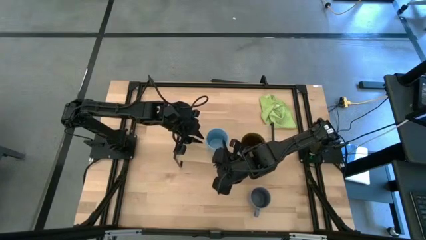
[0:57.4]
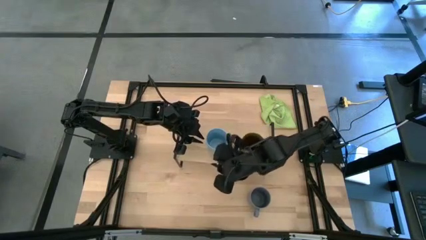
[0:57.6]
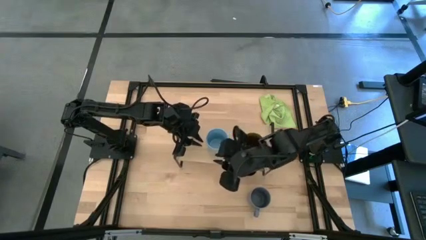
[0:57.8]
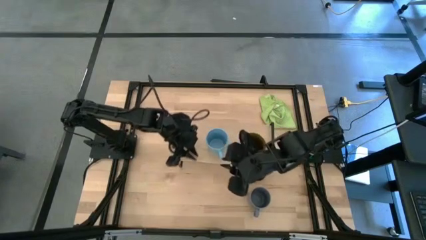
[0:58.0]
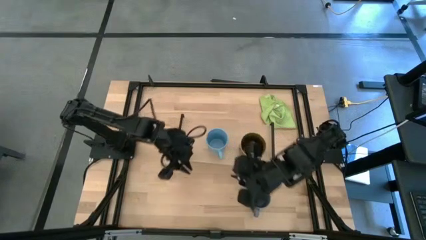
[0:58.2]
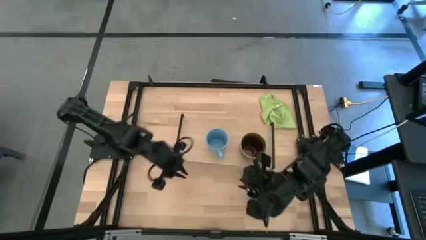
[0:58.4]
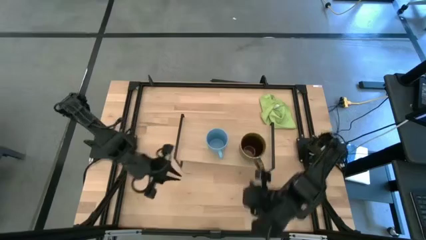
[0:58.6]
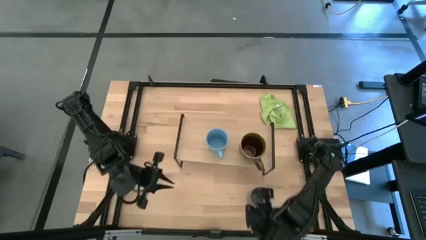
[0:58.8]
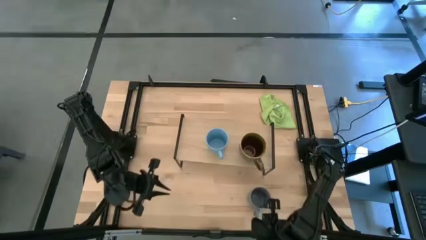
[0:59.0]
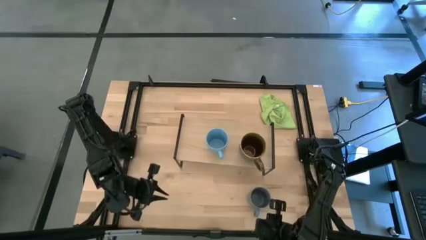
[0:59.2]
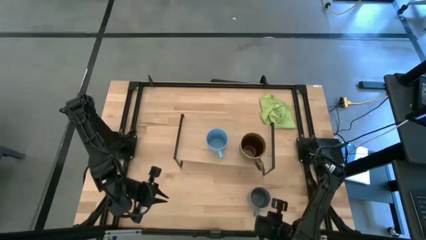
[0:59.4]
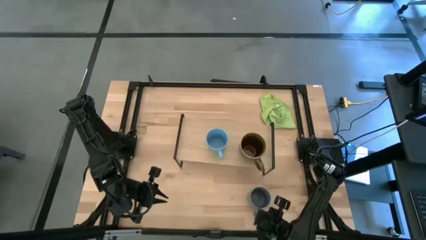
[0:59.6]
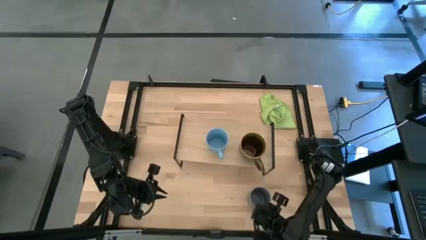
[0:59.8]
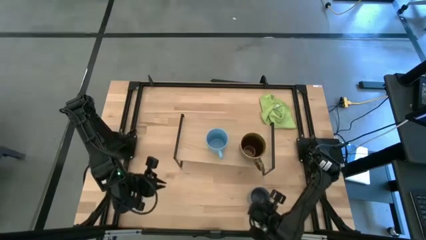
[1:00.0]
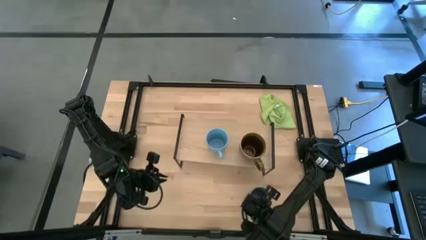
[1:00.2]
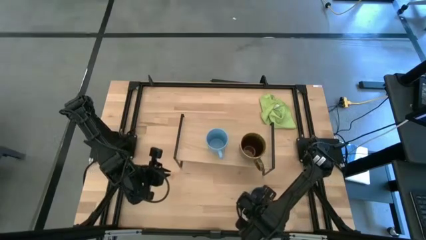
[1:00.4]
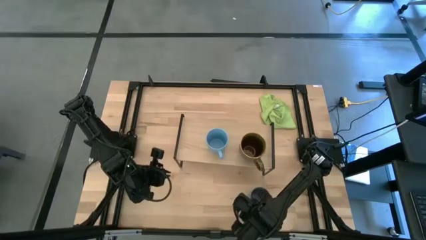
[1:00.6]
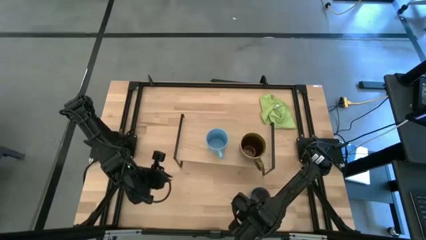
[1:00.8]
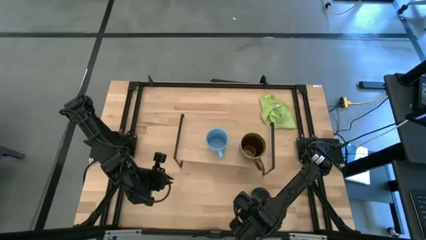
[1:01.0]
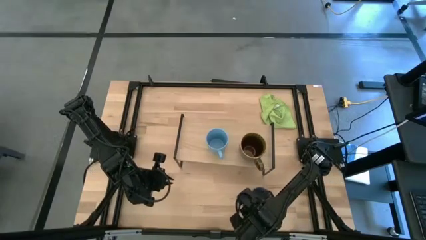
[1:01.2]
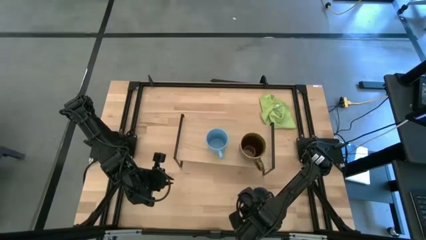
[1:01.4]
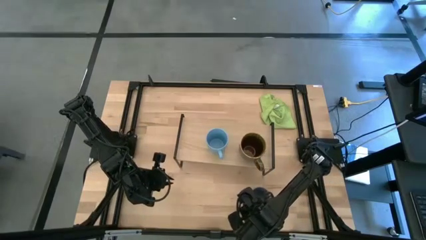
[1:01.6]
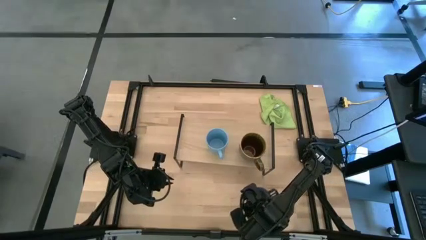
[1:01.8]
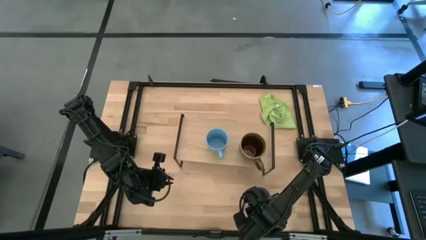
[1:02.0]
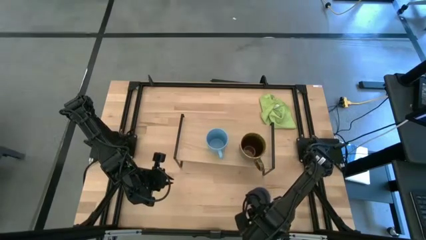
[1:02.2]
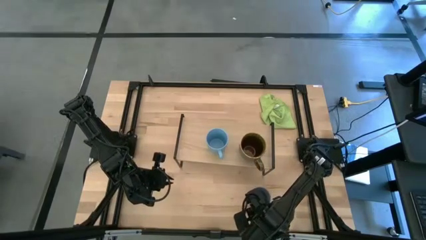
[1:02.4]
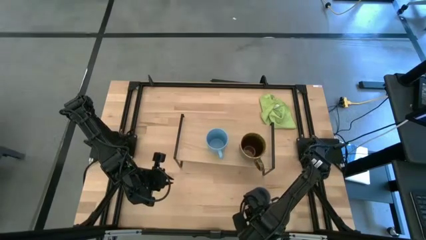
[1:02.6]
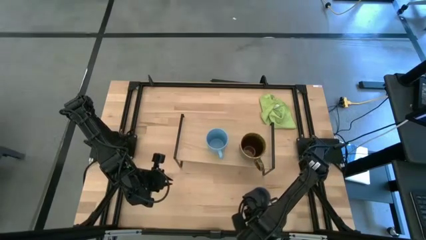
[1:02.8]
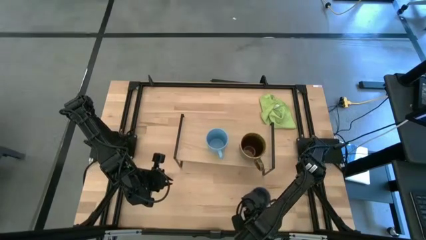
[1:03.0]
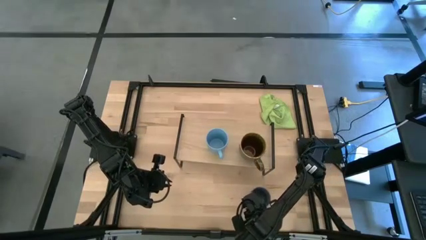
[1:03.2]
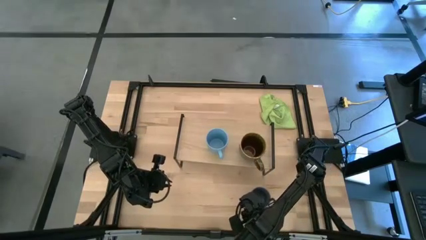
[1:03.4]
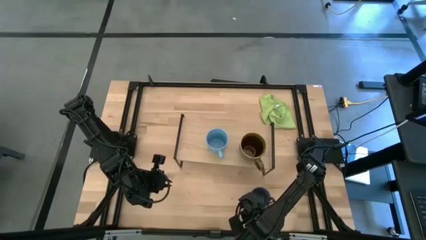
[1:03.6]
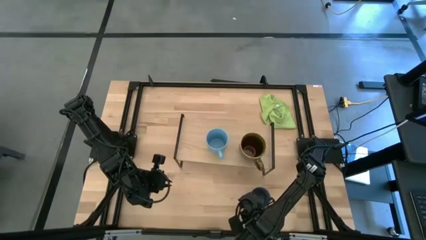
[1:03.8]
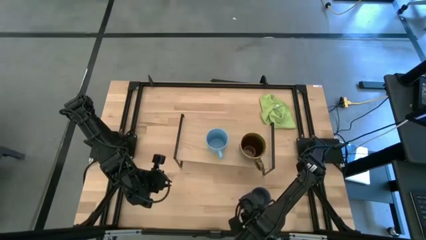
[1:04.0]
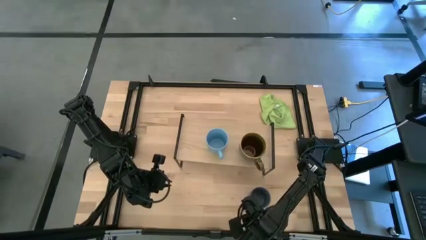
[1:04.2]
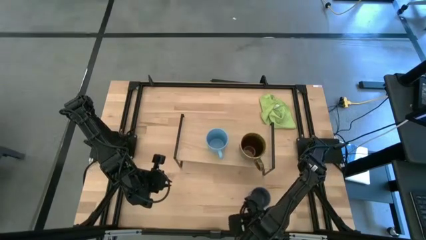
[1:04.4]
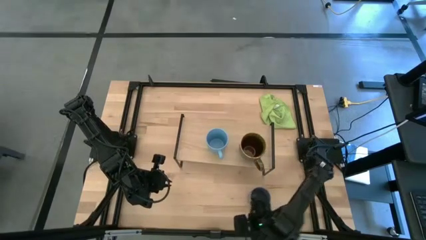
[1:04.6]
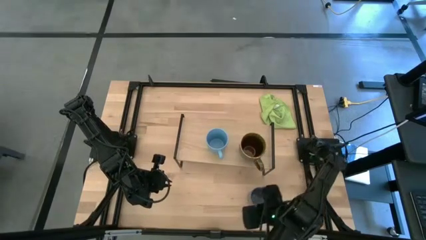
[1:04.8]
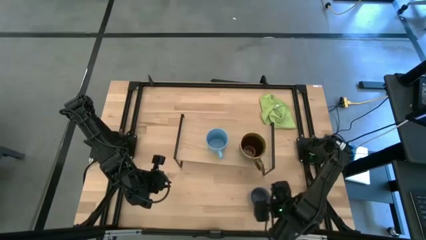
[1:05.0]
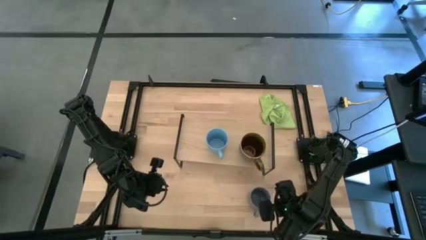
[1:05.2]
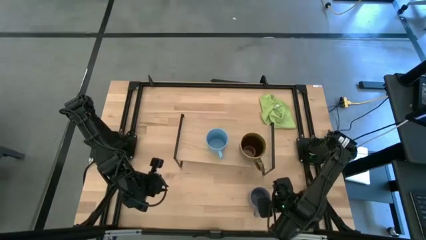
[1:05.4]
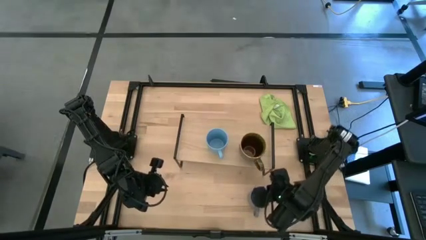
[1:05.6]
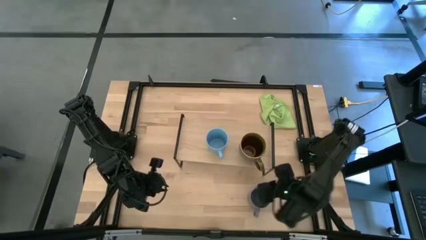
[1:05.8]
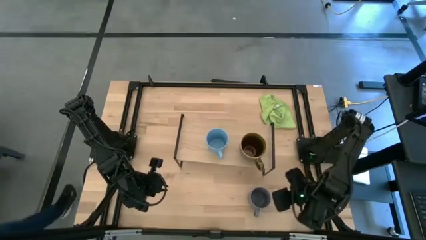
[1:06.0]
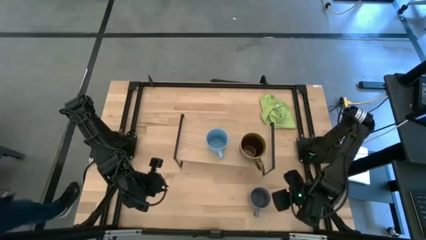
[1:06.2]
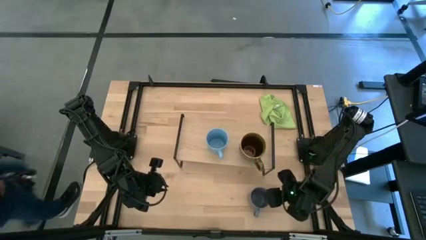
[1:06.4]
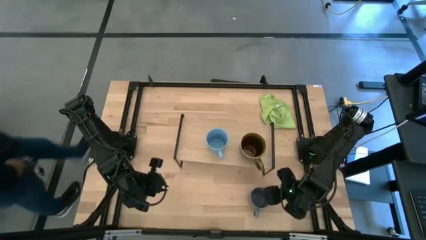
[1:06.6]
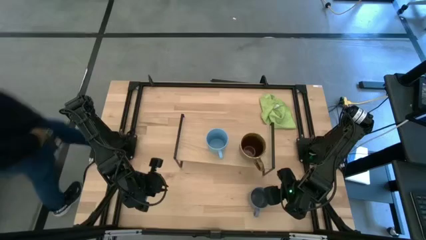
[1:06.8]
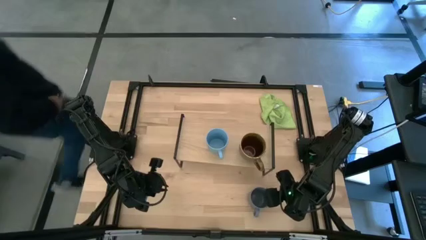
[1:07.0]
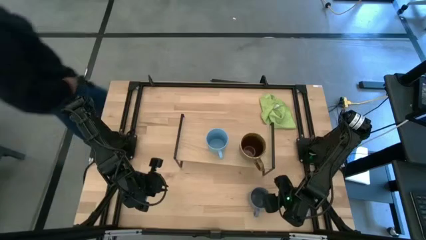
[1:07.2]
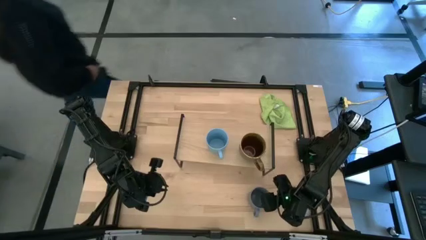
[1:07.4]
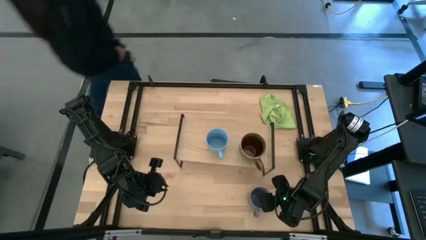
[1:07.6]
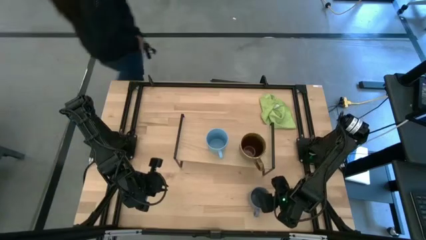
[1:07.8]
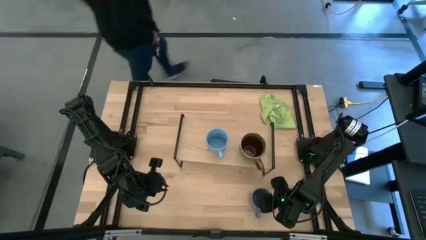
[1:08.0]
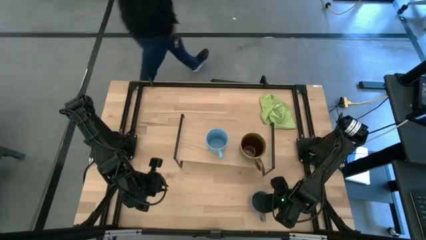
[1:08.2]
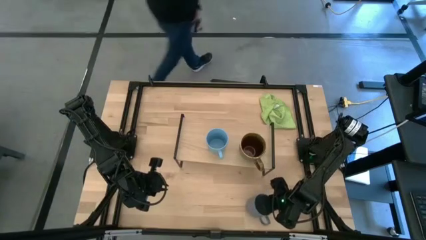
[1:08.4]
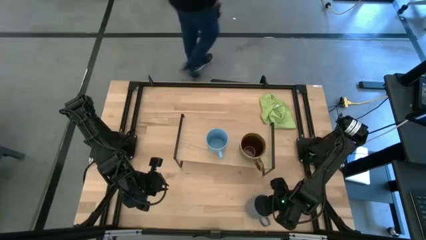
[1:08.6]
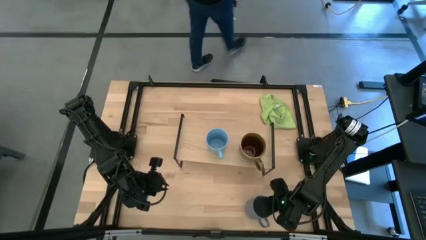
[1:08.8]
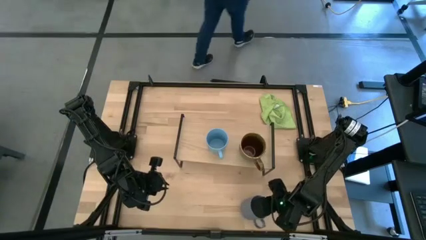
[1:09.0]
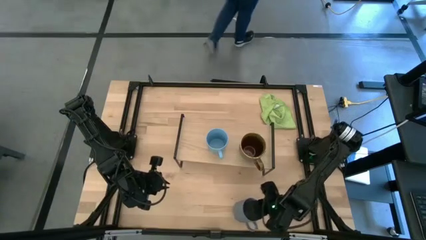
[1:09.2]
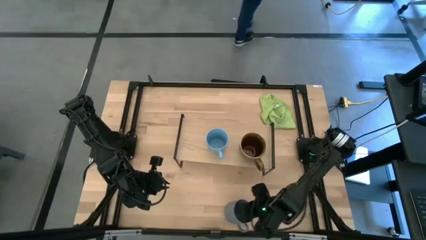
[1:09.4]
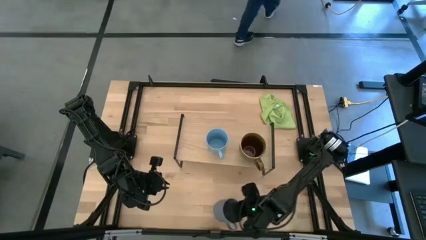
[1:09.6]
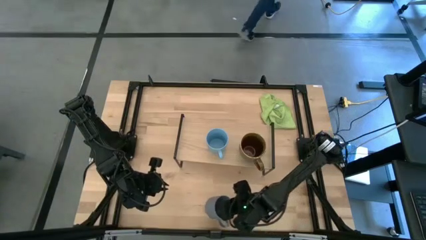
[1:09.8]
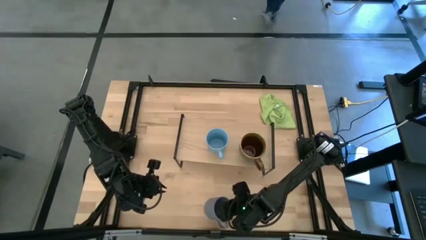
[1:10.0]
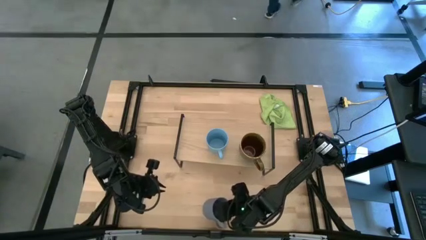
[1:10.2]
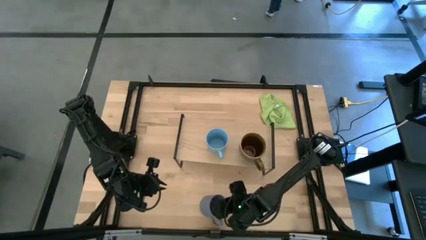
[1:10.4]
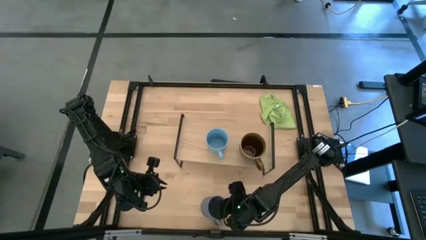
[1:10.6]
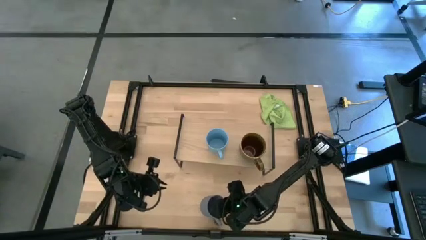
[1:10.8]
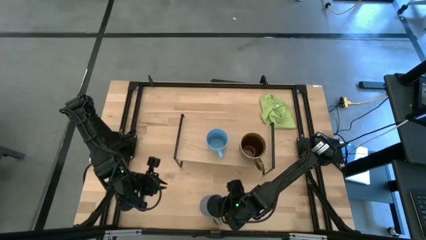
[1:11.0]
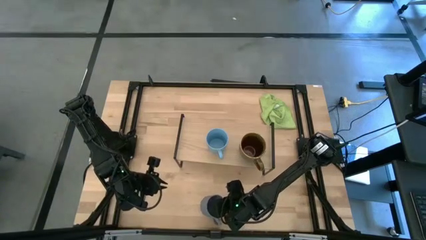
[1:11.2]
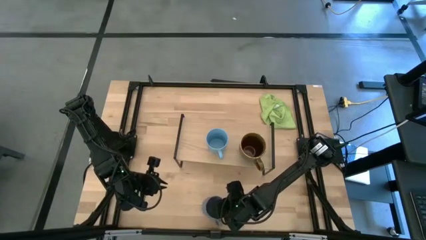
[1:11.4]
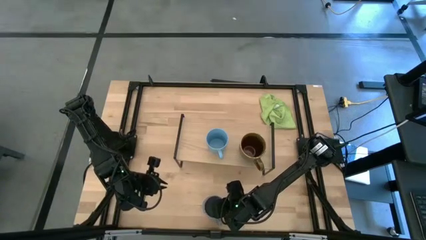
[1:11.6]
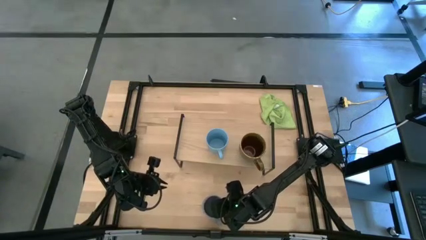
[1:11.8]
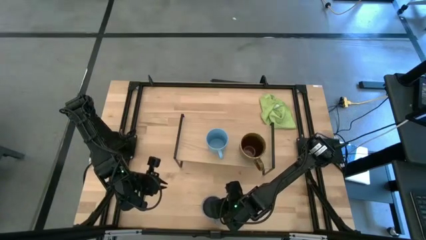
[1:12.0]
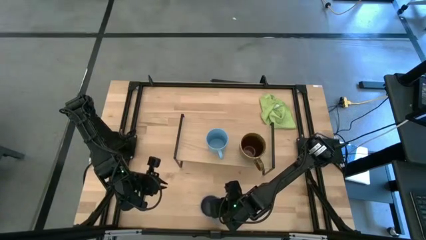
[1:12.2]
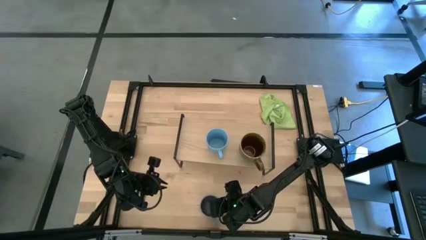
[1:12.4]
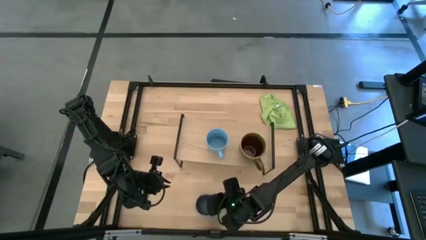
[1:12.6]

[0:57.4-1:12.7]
Task: Stack small to large cups/mugs on shelf
Move the gray mug to the bottom middle of the table
